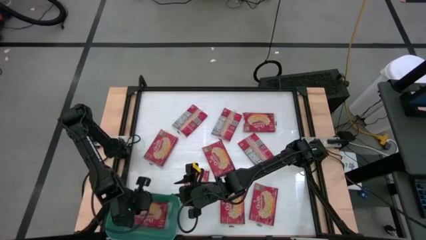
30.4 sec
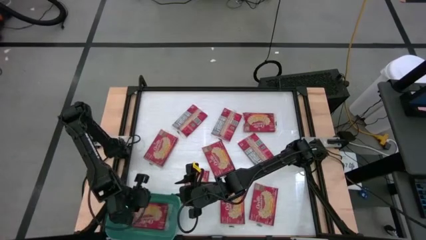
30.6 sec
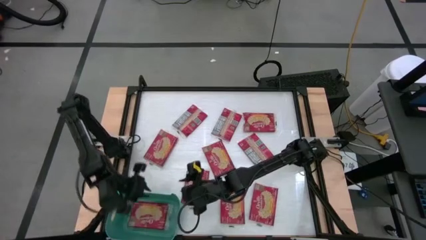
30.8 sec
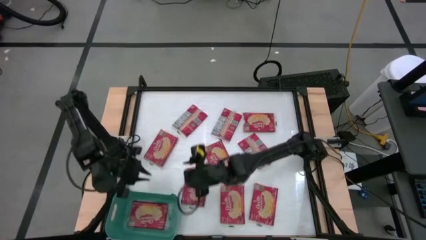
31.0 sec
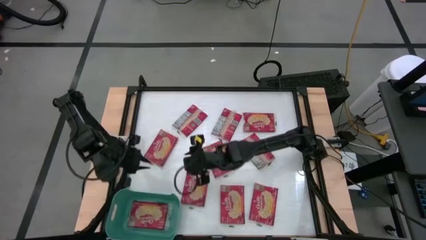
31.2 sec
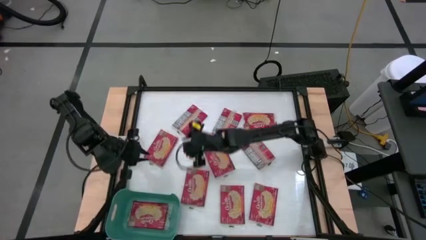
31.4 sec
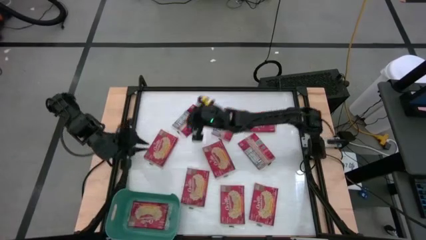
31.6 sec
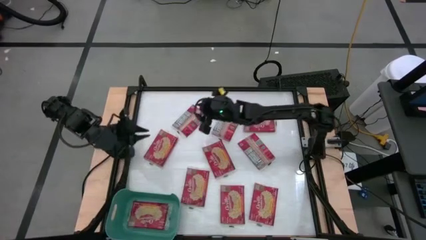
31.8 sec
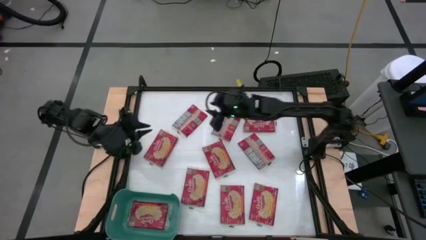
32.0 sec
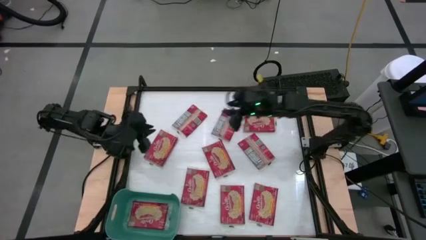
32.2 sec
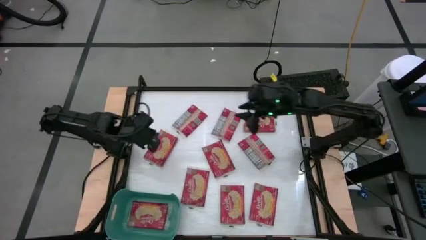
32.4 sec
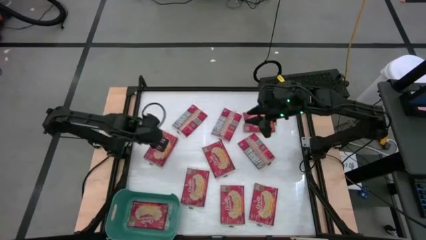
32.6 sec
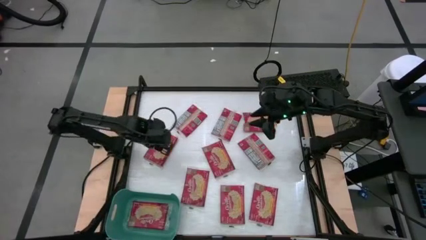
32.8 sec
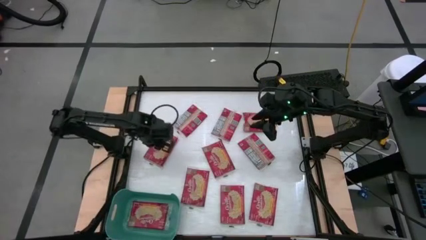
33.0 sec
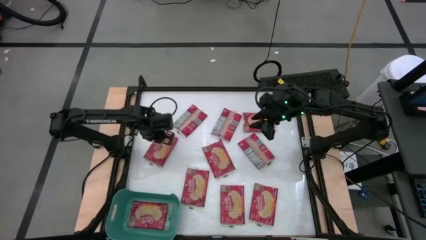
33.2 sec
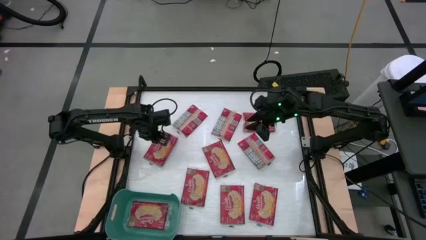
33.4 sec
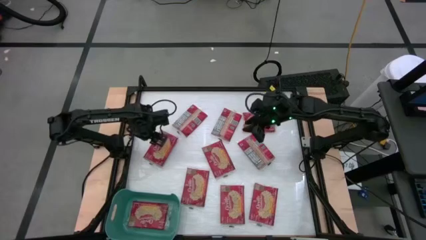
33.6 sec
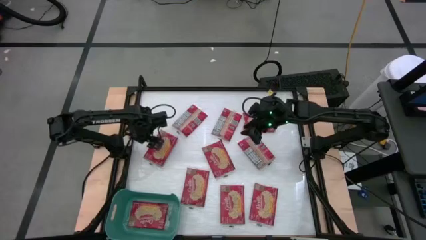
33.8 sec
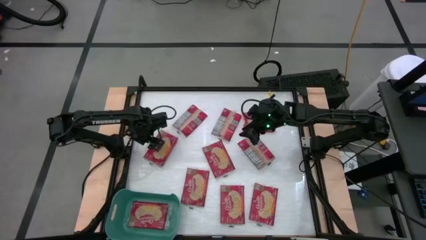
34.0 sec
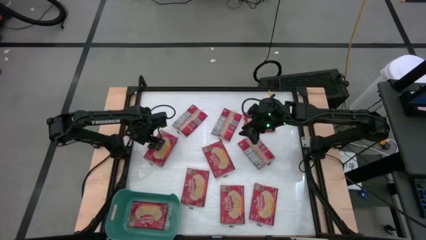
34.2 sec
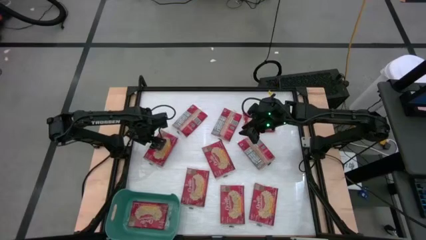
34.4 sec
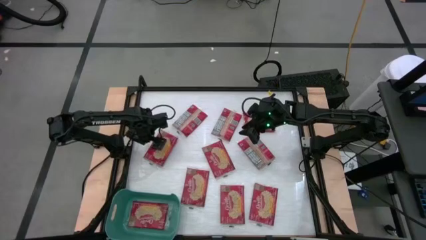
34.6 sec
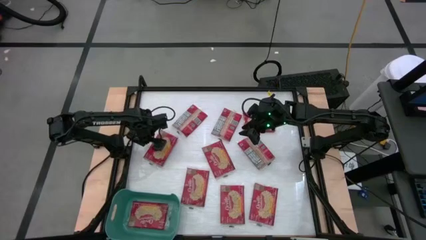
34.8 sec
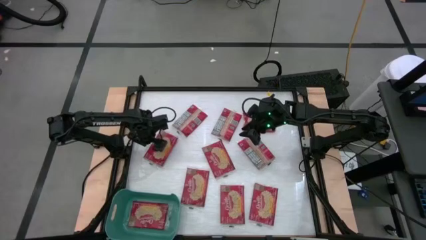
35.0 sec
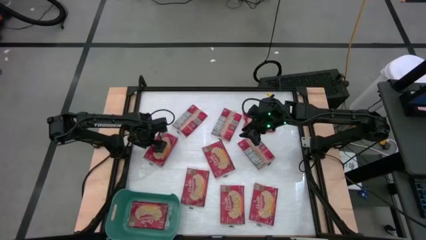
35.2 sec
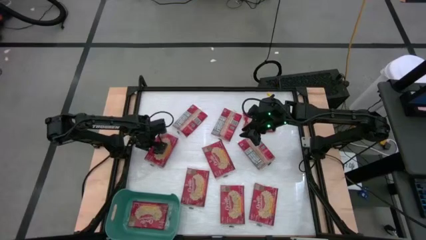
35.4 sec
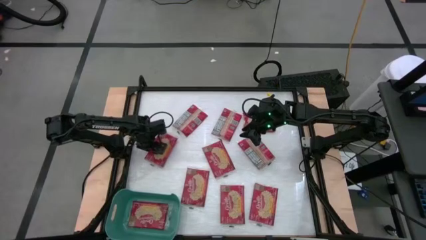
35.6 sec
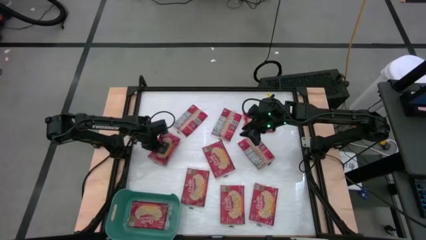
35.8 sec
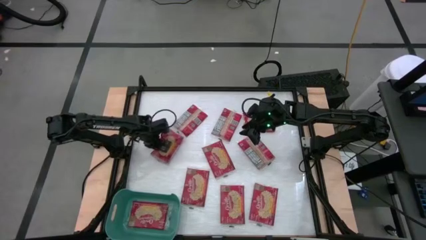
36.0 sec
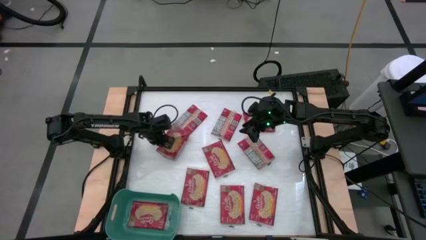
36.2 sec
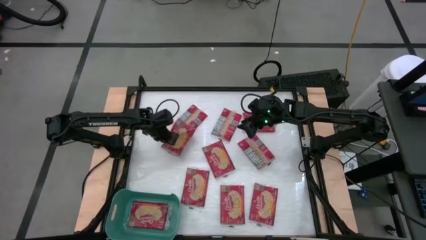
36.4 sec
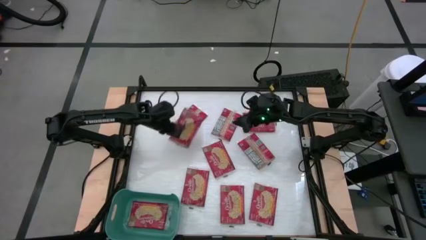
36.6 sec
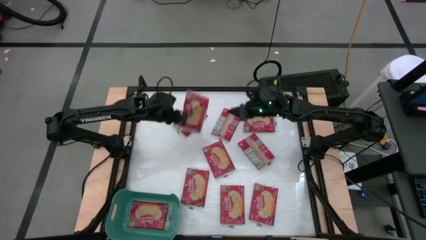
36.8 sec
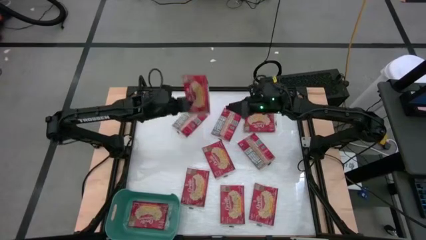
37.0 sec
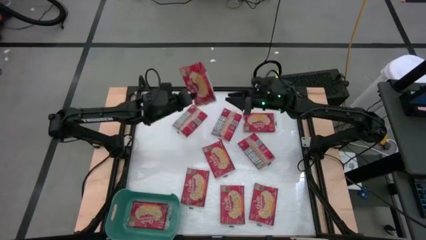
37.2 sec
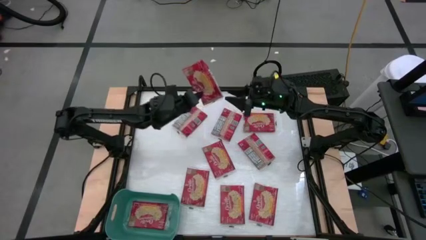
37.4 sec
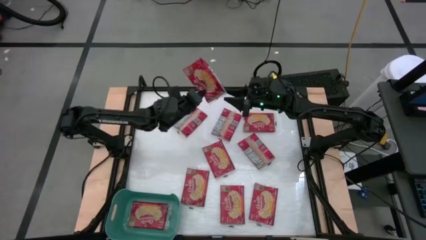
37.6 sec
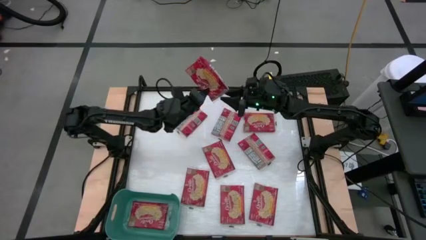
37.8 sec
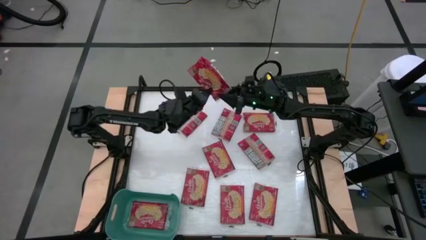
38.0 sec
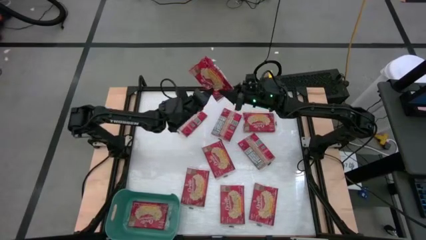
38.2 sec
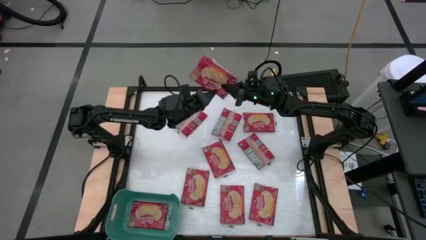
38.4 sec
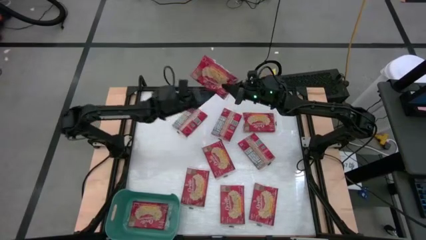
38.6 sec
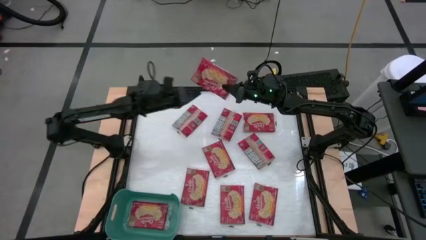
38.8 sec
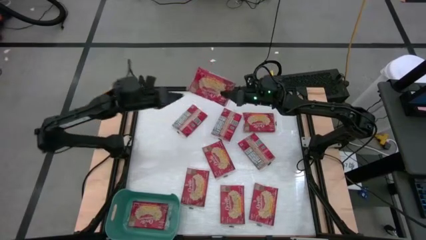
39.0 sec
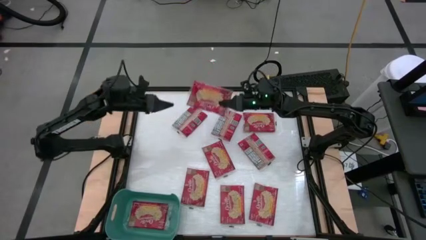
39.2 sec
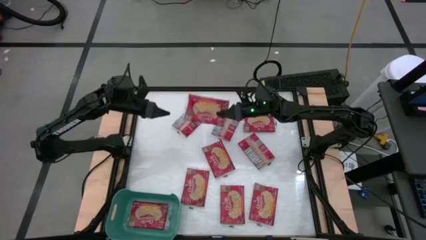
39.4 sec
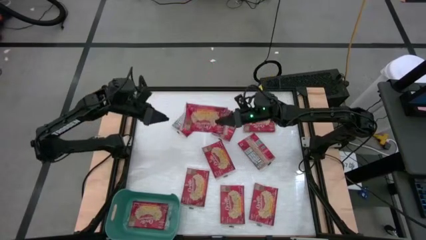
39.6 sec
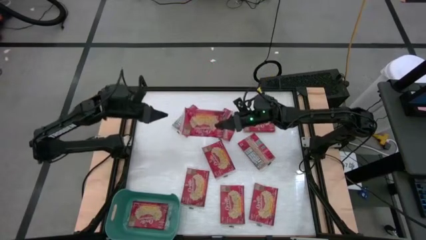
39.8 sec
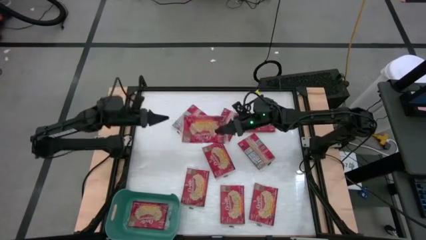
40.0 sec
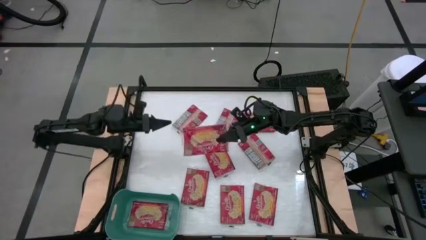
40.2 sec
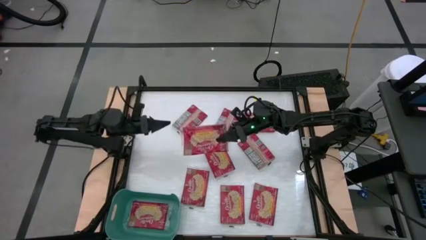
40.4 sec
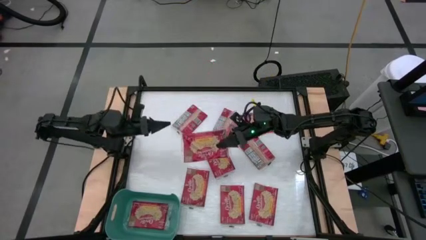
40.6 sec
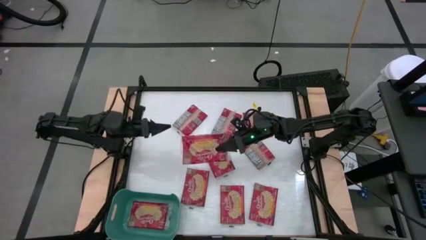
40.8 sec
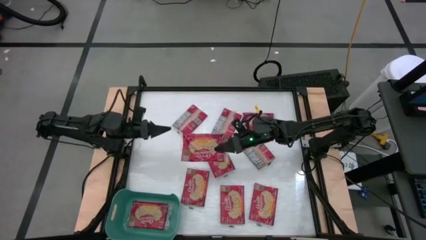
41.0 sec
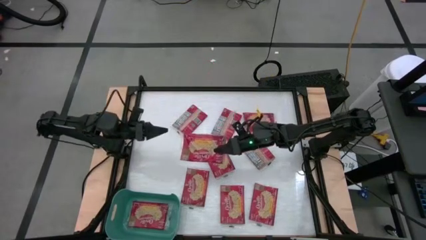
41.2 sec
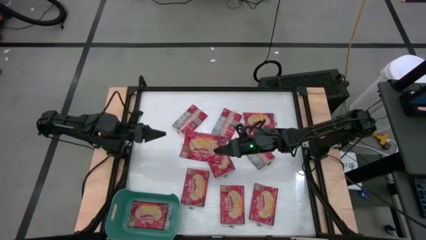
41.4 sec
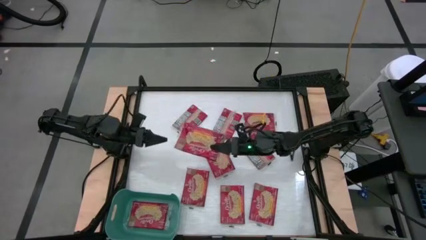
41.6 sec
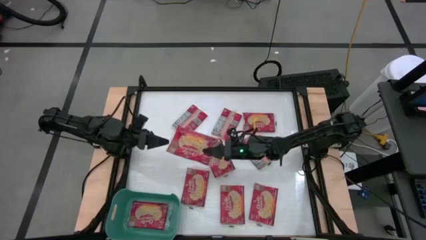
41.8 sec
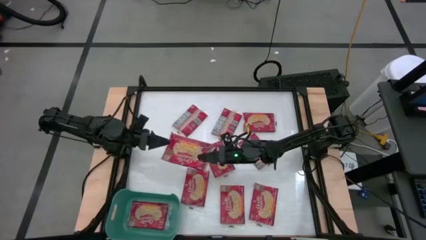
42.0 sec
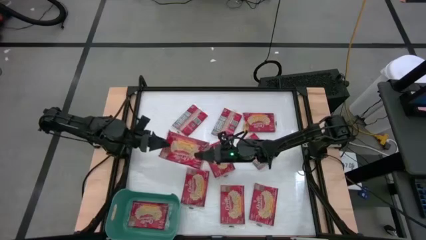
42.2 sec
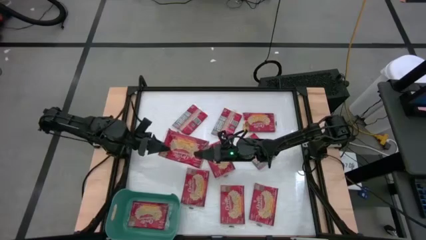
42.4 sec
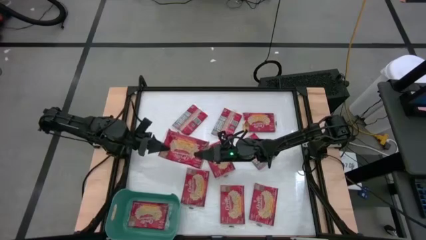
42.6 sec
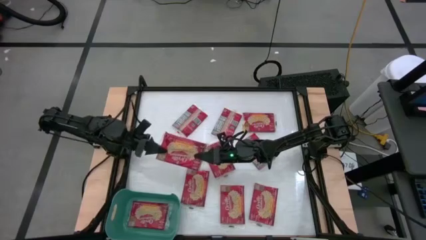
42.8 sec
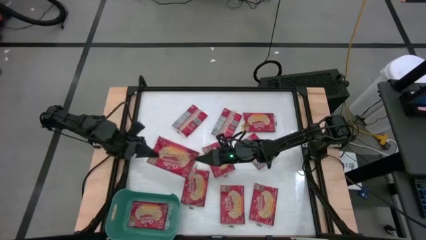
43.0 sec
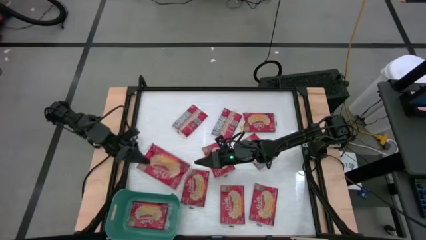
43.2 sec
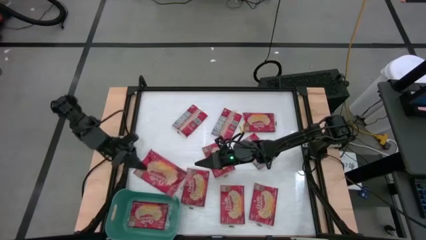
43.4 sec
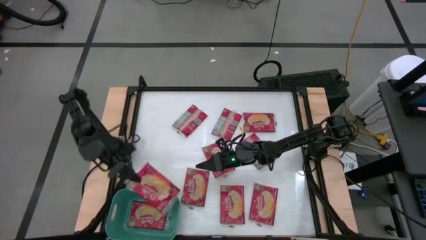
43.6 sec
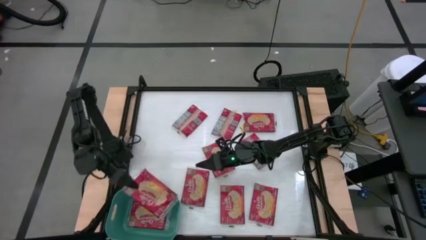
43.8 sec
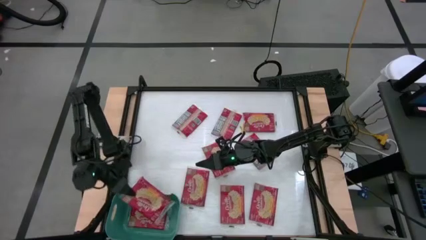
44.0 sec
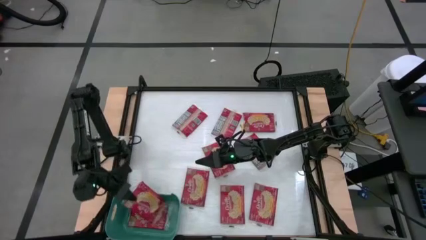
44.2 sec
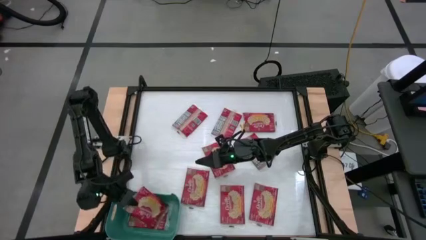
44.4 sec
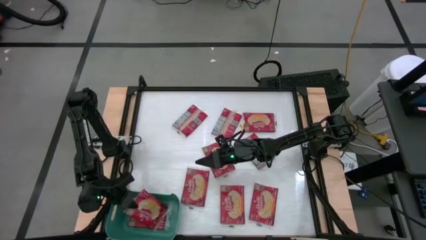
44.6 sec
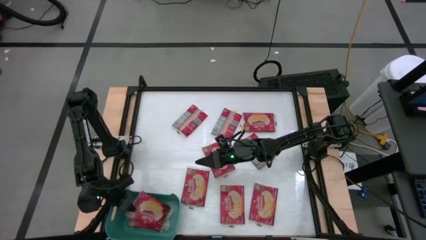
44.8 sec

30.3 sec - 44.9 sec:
Task: Sort popcorn bags into baskets
Put the red popcorn bag into the green bin
